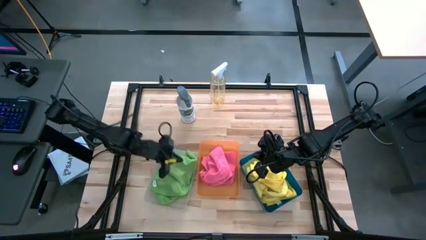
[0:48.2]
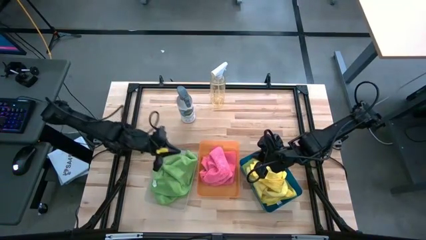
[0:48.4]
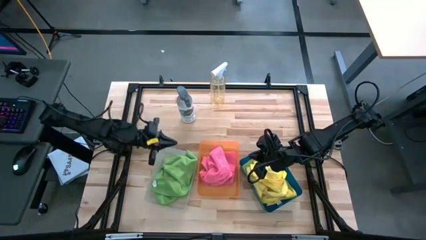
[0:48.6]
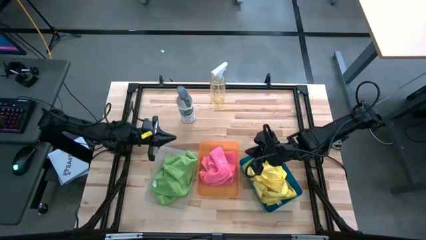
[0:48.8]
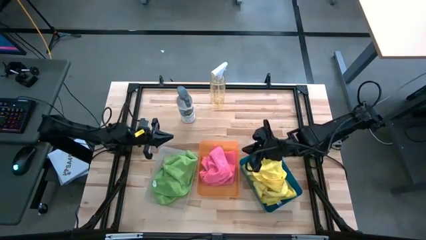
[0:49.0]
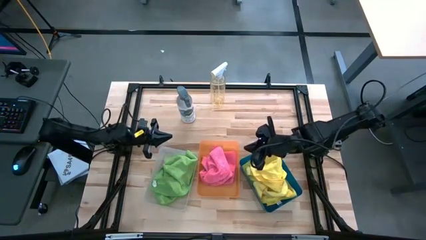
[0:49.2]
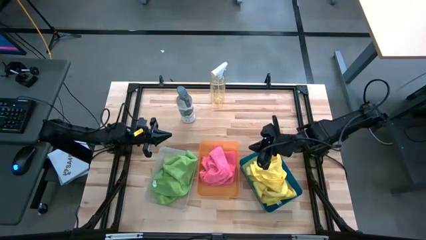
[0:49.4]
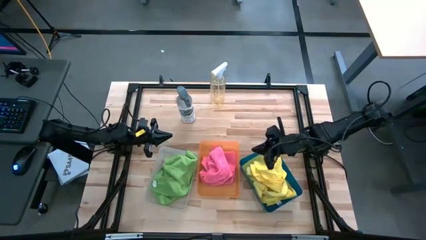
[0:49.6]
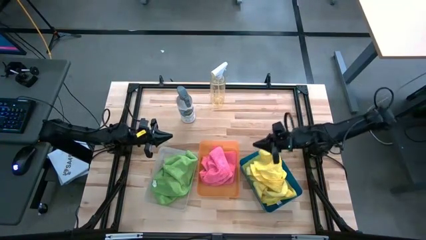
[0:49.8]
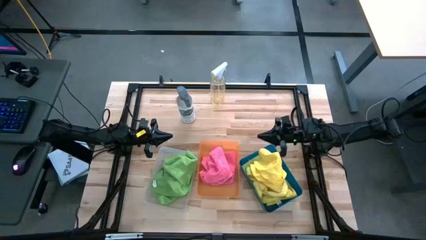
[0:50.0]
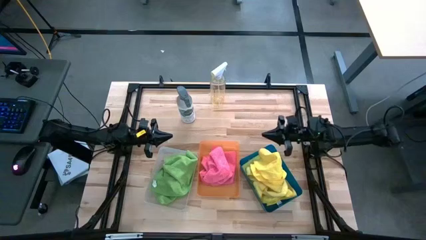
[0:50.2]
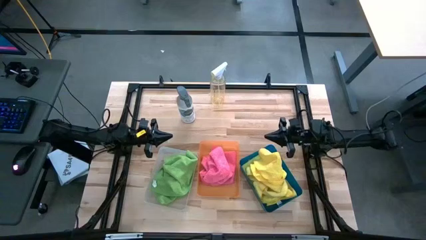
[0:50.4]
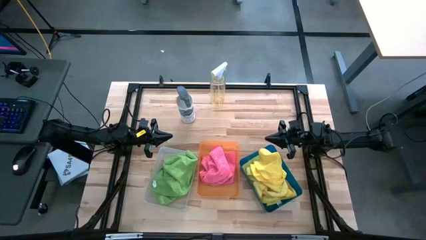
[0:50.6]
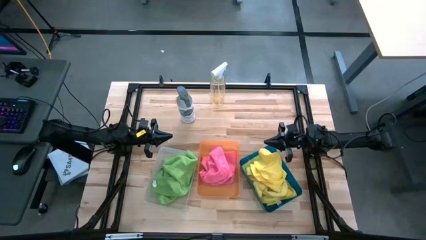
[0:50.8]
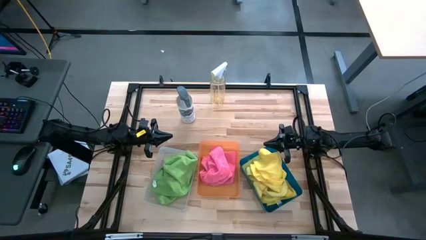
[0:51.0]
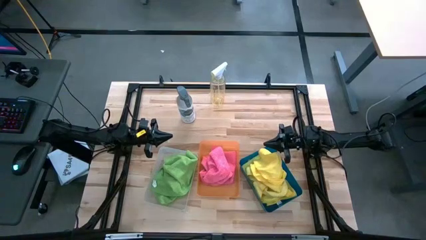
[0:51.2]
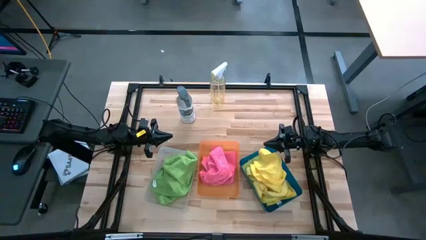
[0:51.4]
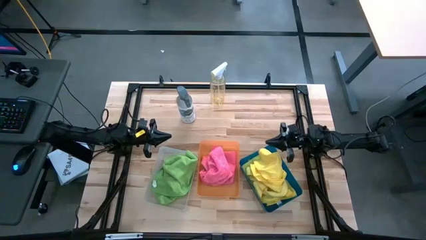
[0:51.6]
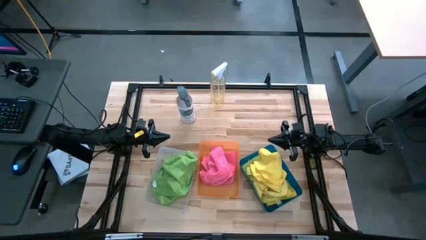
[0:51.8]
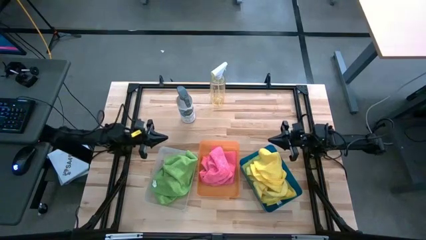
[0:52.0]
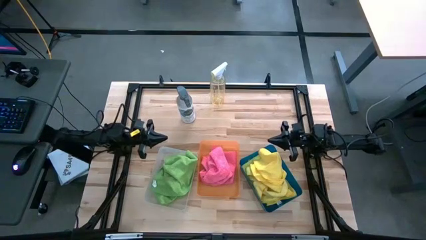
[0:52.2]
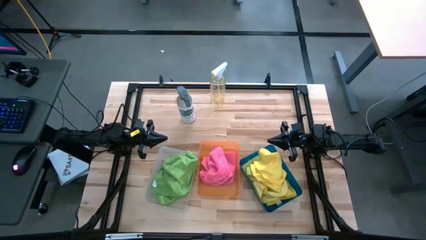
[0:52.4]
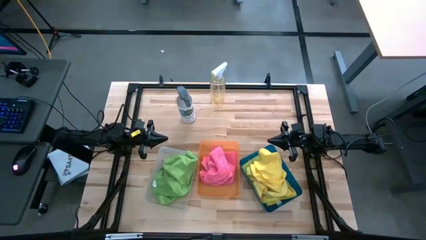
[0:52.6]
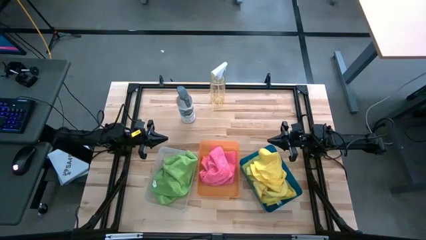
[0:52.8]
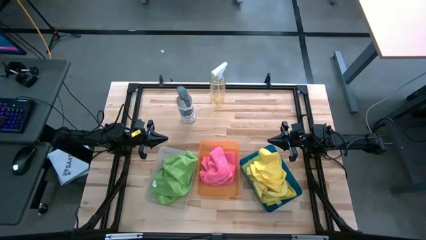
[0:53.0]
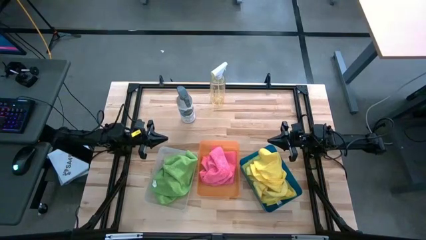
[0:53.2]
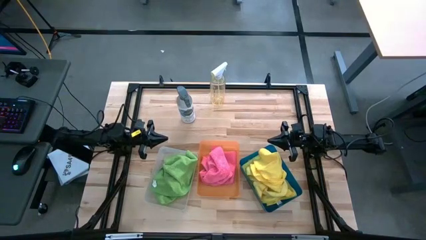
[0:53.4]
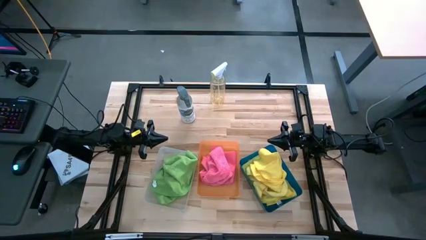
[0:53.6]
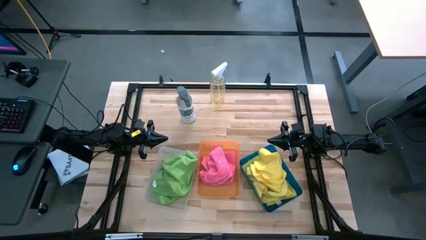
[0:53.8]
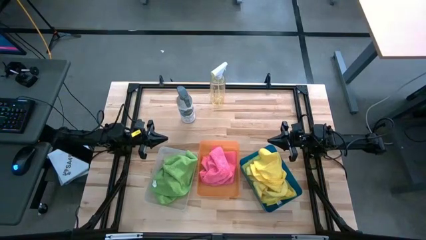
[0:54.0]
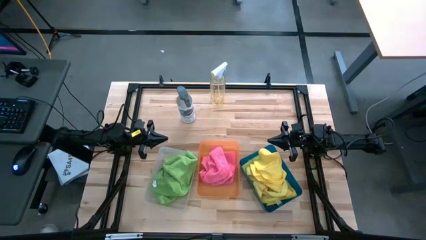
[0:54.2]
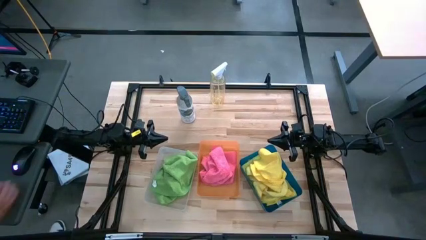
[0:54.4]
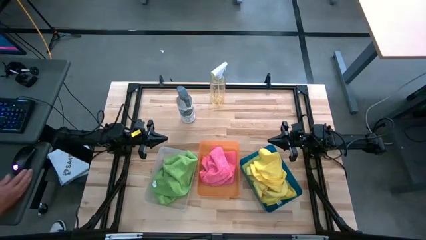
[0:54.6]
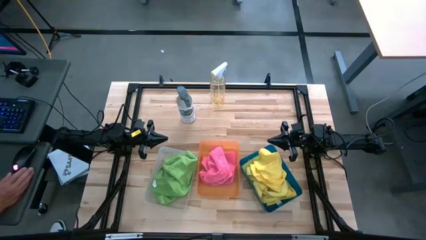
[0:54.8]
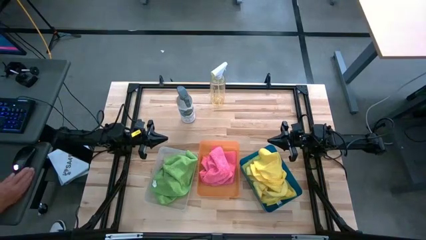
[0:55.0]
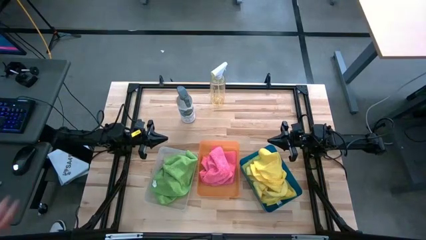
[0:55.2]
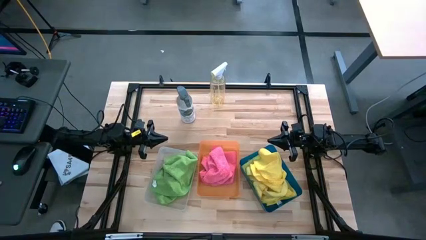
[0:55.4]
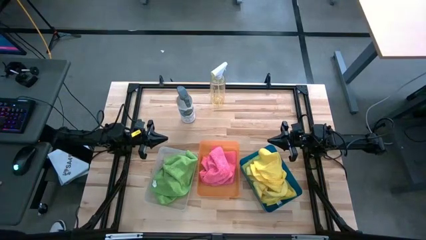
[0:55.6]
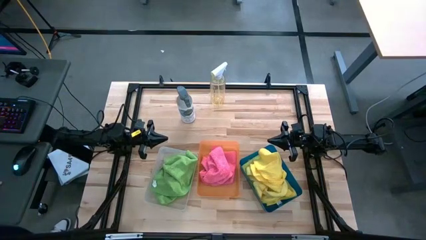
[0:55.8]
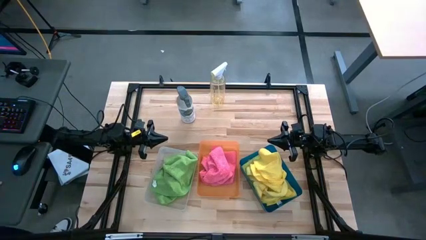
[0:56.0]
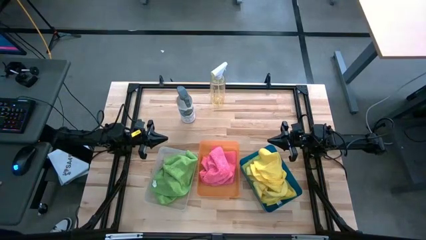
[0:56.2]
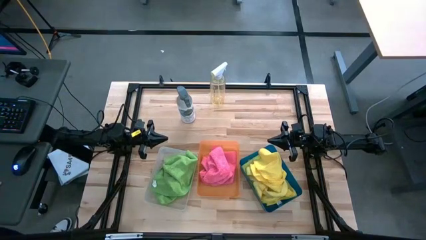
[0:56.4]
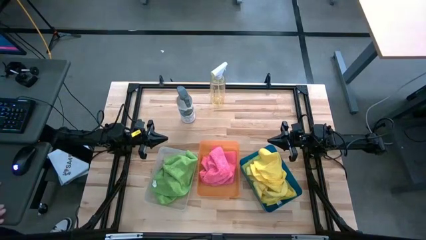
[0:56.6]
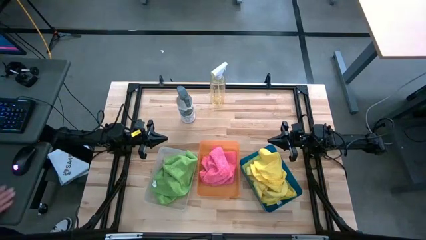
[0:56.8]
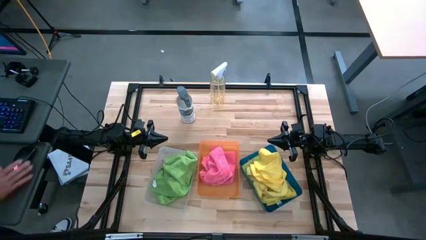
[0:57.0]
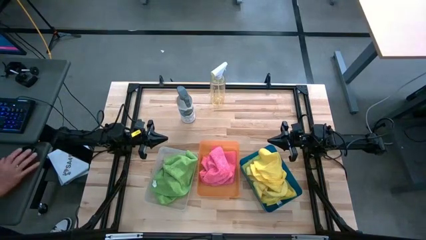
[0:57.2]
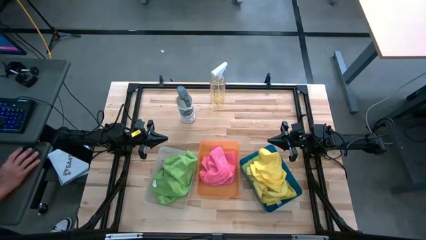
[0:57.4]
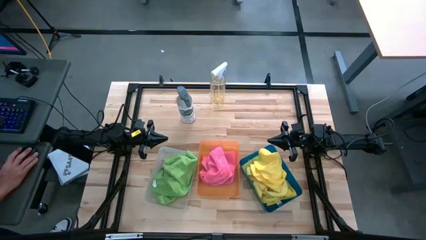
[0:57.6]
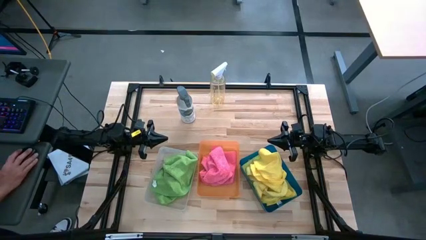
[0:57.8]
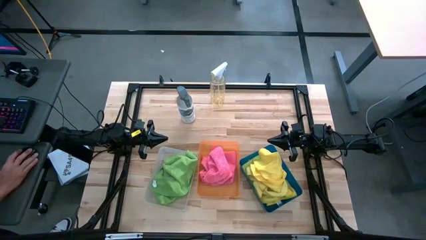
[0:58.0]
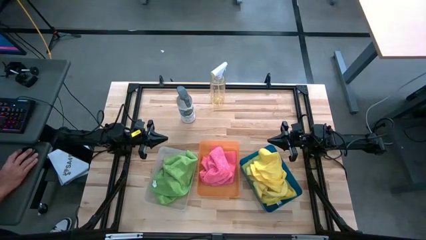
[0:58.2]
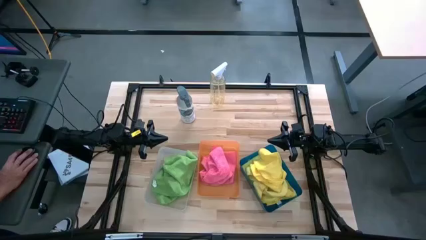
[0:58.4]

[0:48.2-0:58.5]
Task: Sort microfiber towel by color & place in baskets
Return to Home Position
